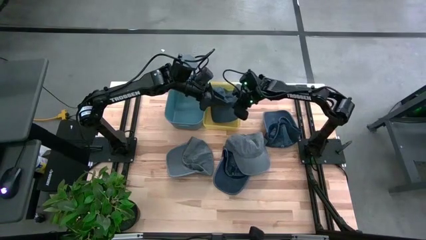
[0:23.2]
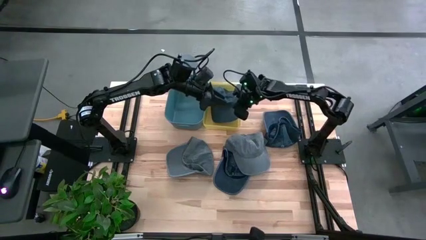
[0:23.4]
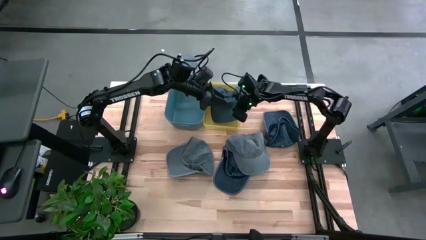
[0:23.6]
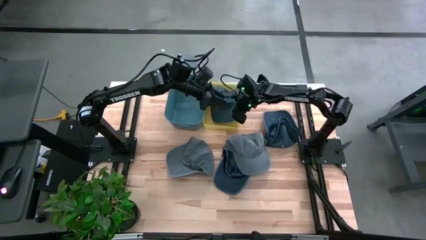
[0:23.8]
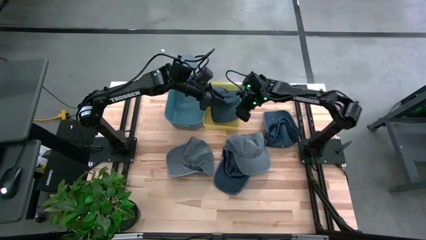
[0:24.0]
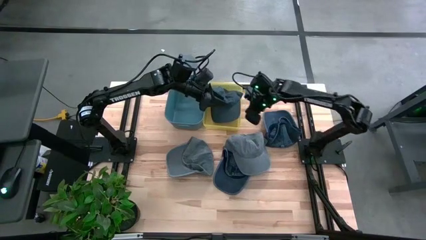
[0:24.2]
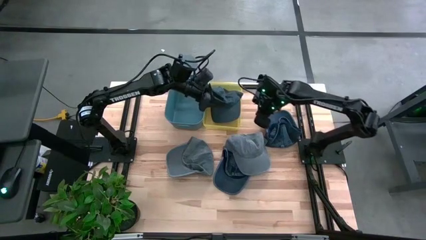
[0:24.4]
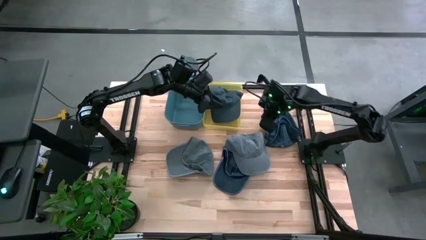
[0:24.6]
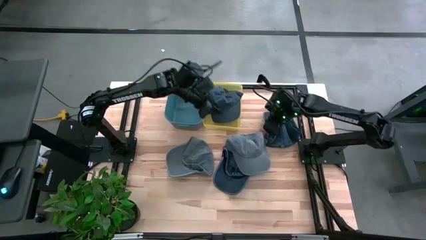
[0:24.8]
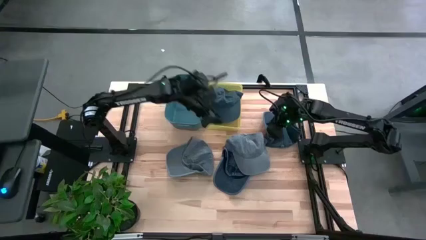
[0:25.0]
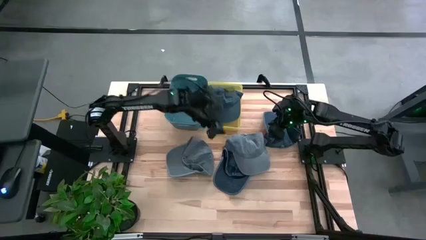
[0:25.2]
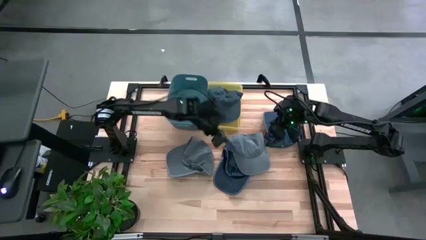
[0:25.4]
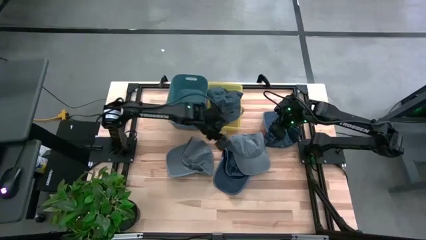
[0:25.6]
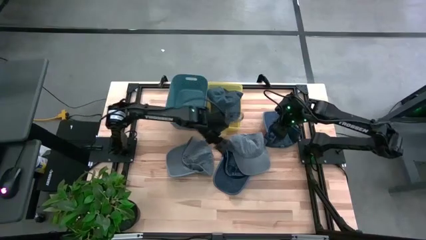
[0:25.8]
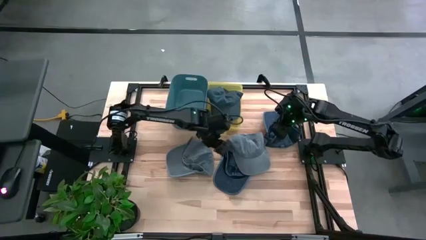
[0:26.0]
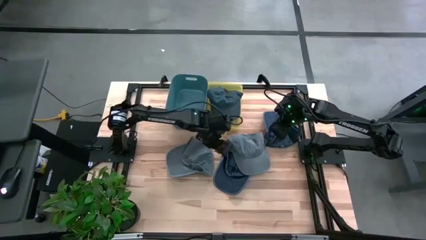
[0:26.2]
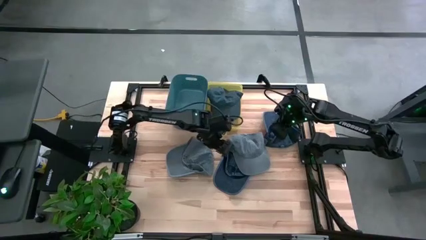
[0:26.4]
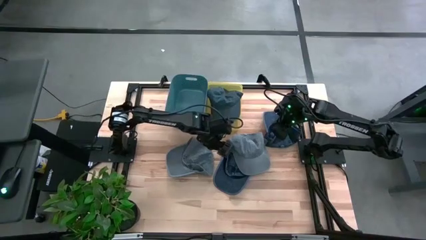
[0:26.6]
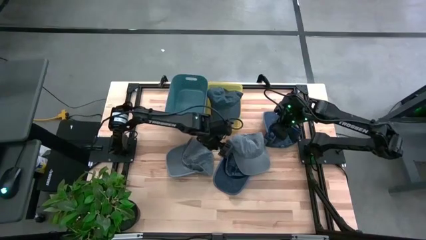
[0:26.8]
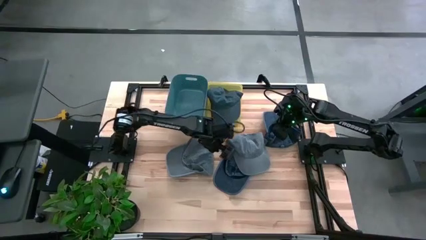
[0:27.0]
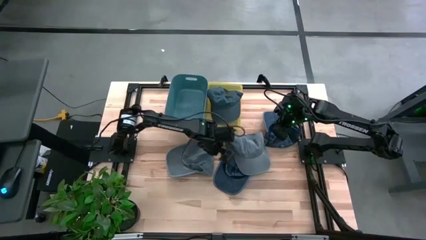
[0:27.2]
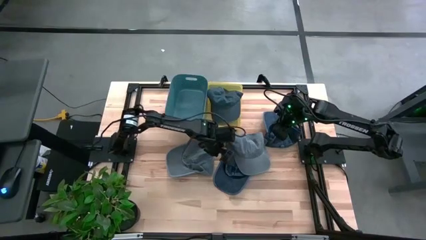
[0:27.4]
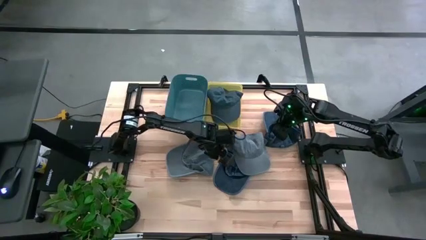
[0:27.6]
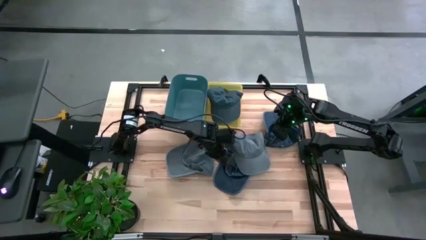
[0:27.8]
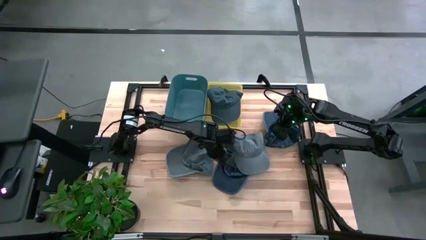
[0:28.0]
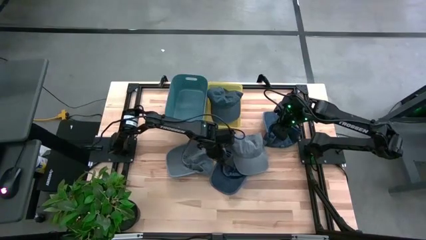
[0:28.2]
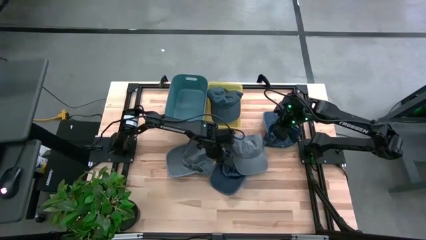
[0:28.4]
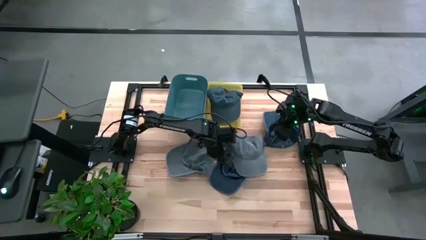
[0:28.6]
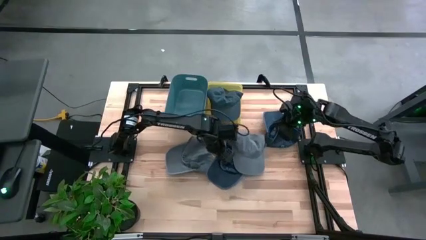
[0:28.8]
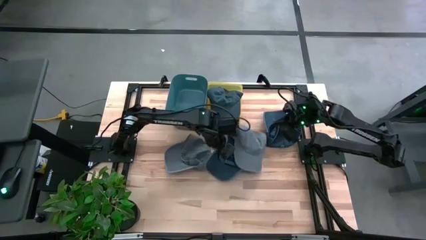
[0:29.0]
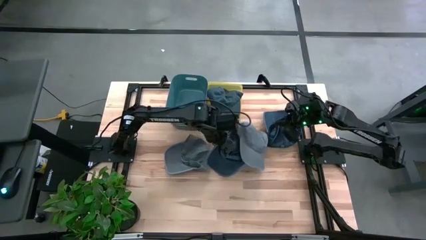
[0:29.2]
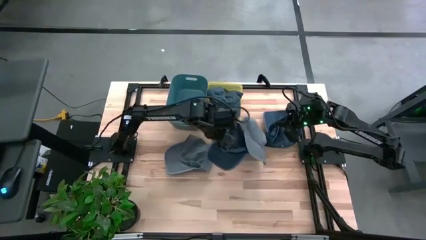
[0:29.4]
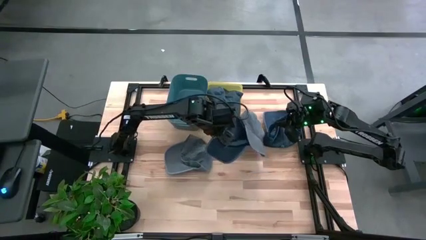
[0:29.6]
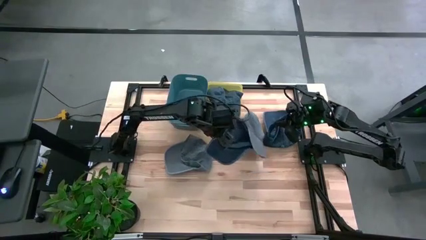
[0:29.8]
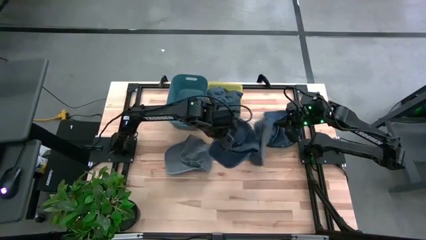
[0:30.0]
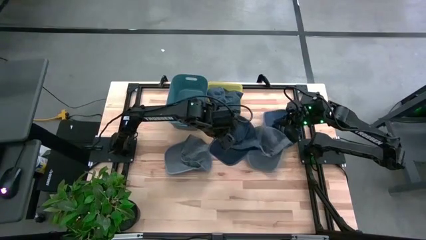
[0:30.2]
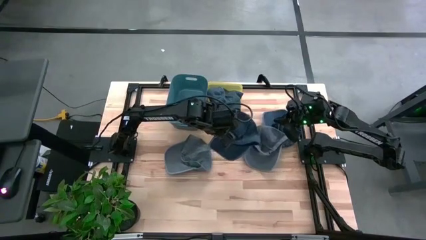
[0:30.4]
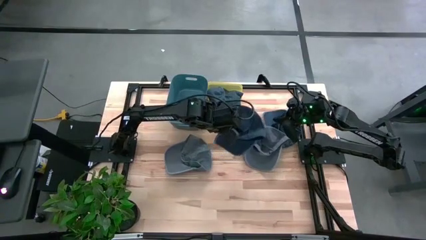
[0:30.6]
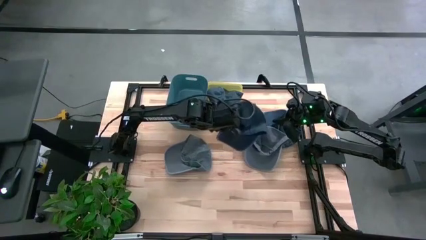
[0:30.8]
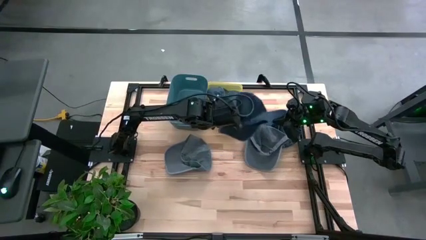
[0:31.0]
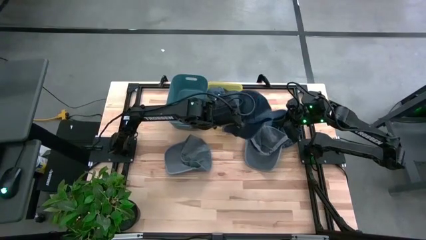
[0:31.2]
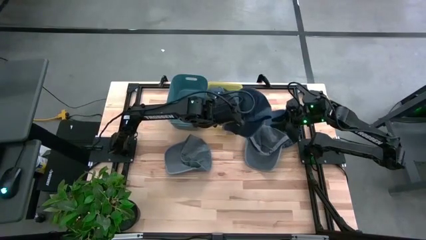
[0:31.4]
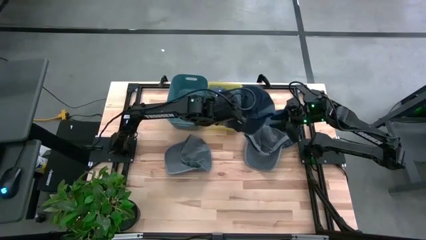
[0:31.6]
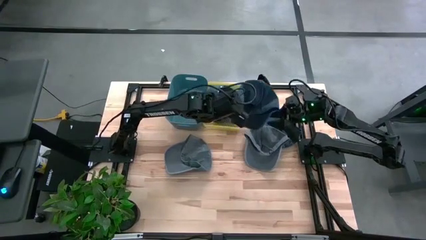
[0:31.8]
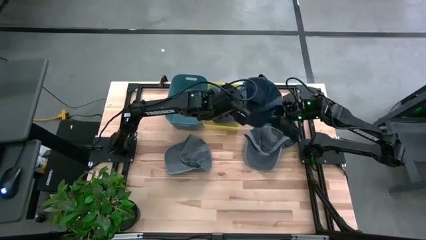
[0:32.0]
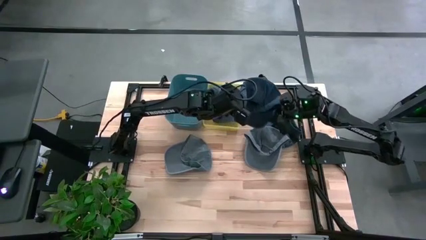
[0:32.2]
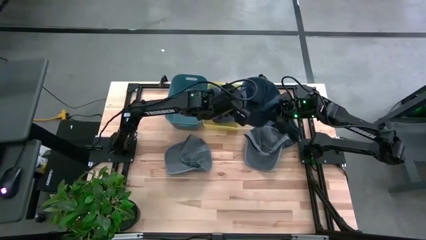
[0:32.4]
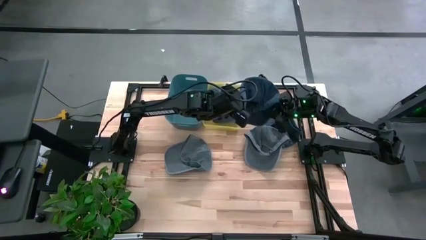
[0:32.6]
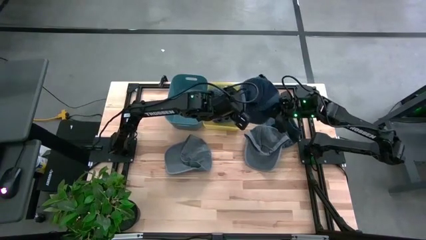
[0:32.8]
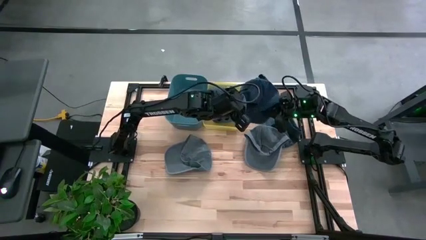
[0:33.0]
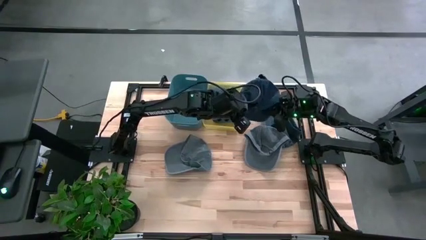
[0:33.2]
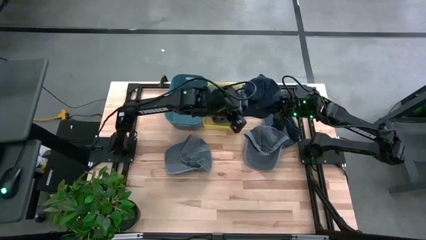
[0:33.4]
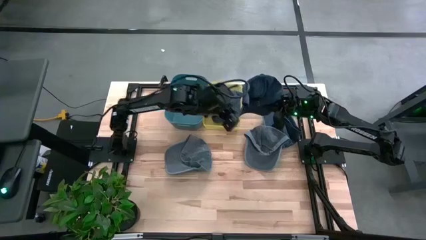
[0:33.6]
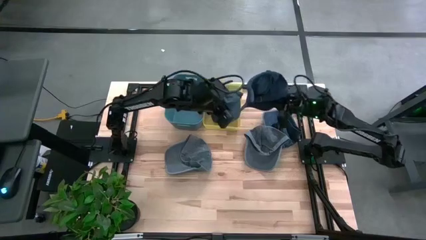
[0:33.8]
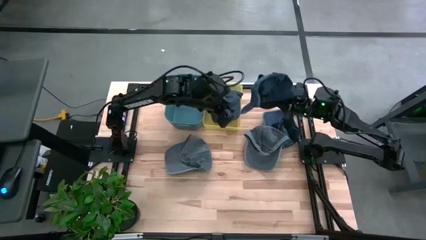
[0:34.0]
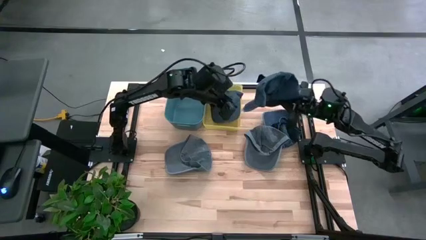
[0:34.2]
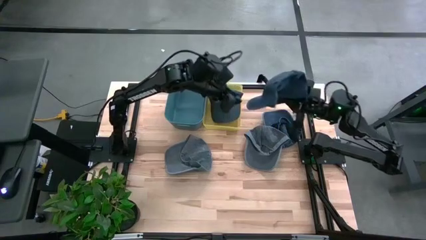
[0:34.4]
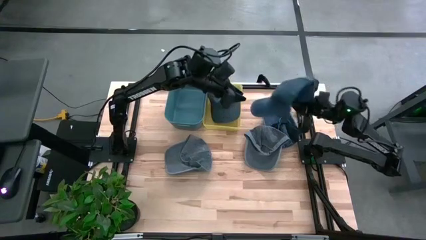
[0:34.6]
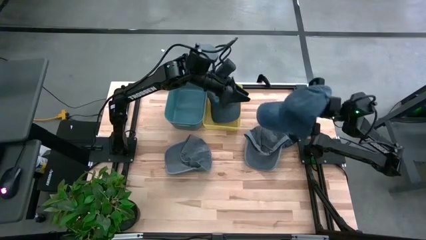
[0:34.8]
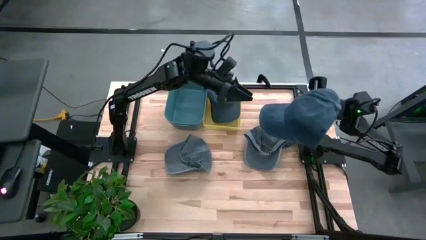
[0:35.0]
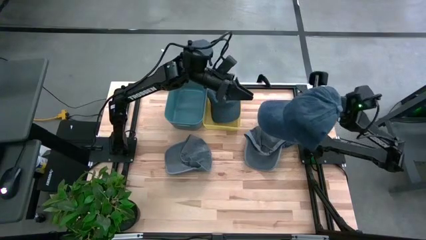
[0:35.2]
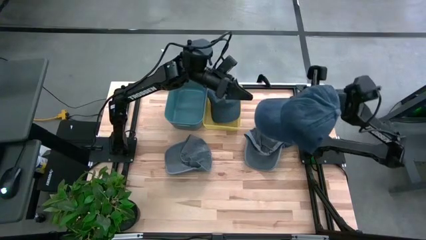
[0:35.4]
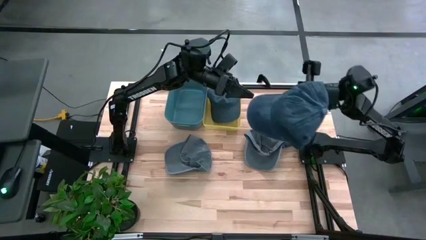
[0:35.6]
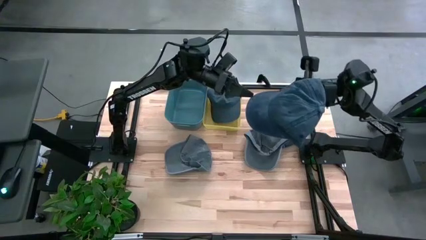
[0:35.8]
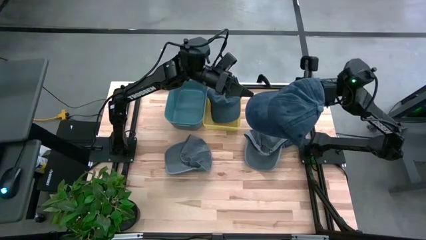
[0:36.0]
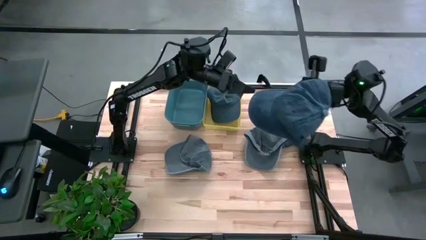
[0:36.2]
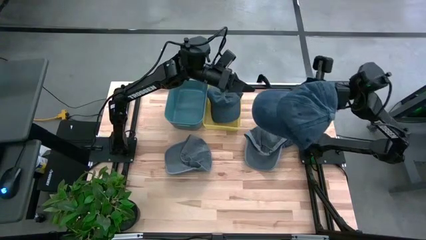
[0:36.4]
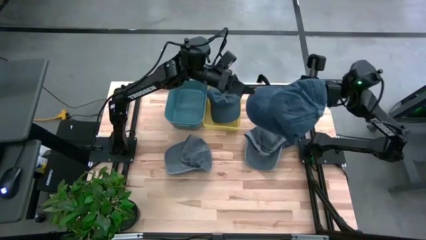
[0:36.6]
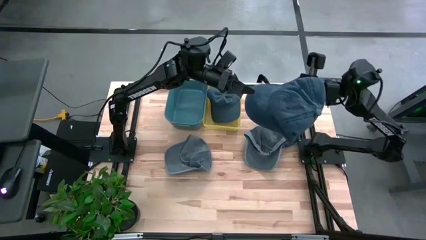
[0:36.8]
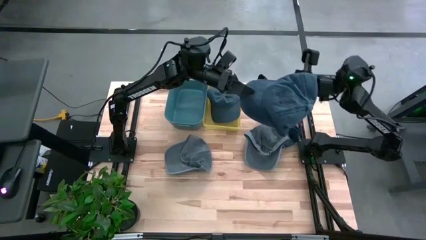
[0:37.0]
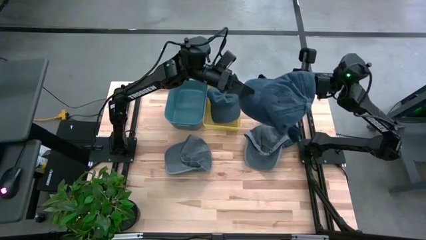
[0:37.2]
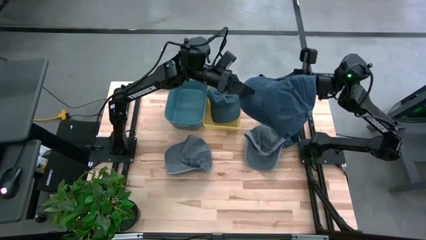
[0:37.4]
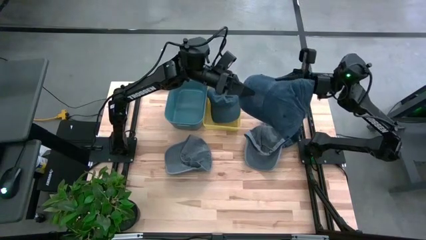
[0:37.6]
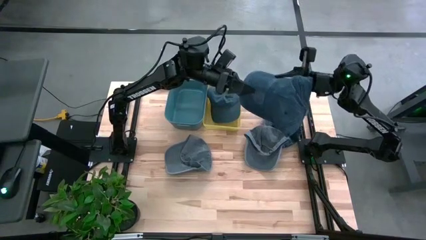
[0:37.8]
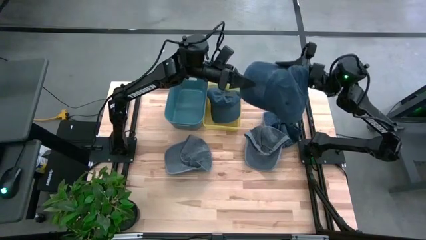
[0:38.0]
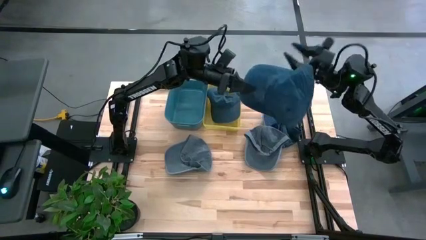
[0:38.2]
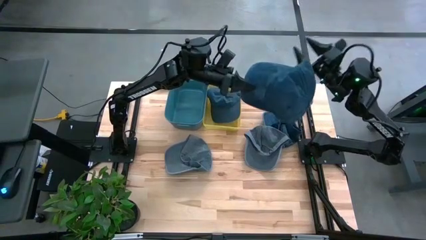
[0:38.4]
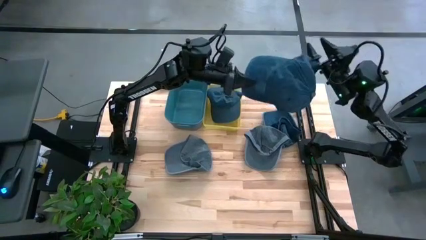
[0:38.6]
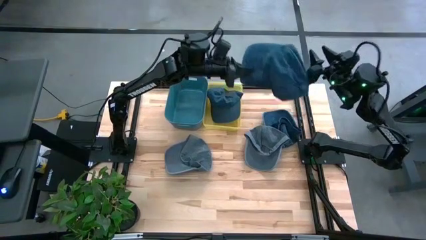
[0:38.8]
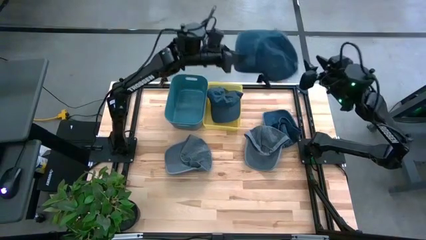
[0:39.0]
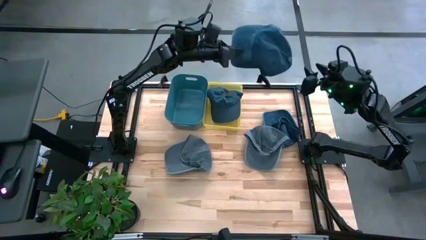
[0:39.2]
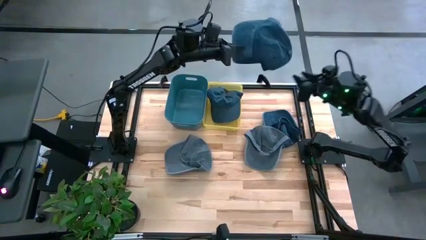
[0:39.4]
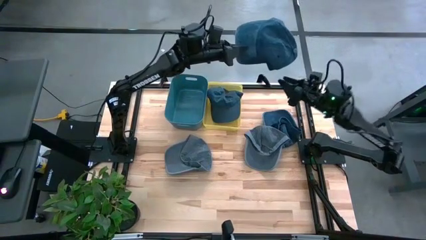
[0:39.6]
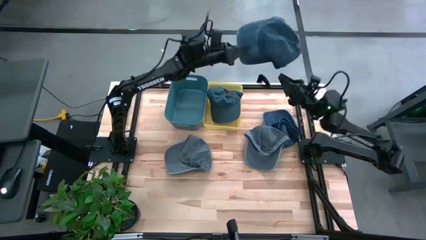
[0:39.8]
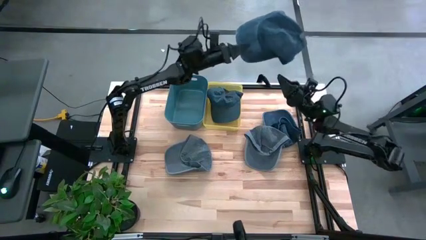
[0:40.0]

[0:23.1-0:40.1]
Task: Pick & Place hat
Put the bottom blue cap into the yellow bin
